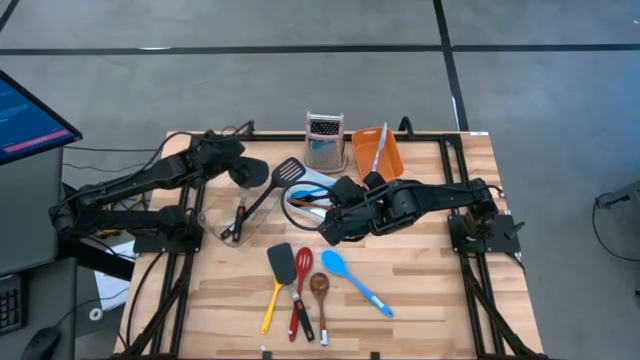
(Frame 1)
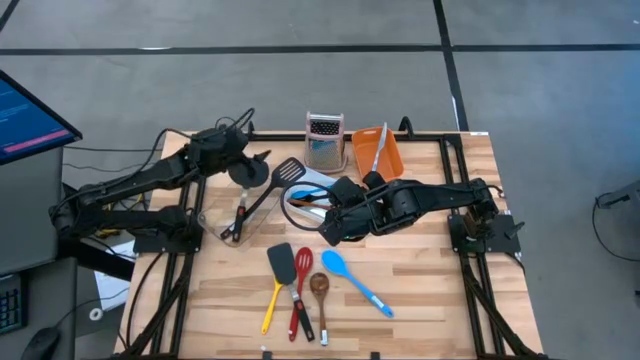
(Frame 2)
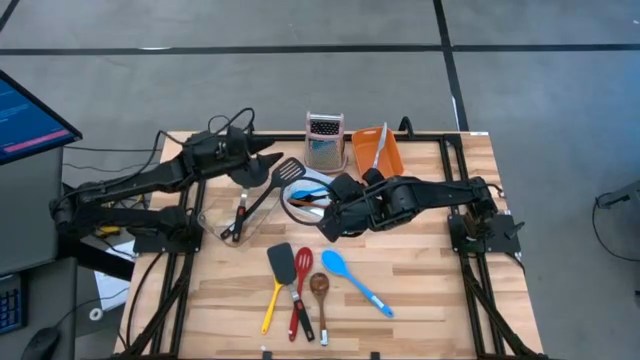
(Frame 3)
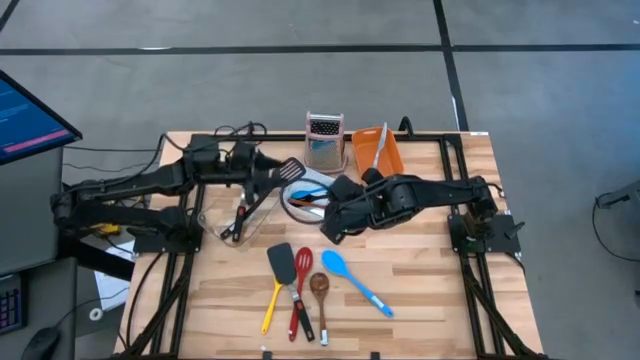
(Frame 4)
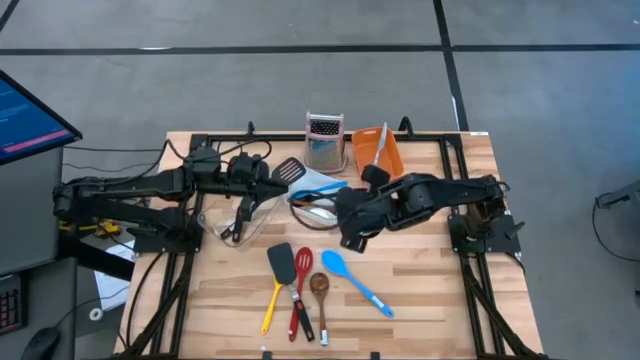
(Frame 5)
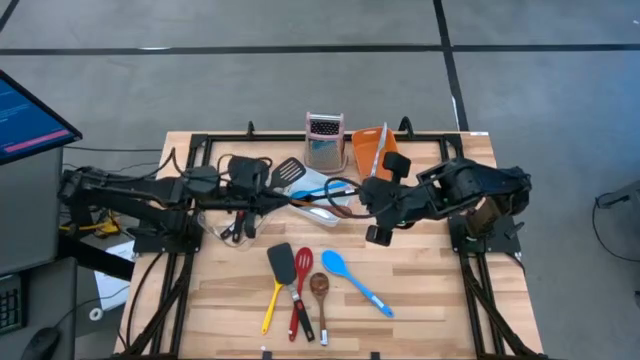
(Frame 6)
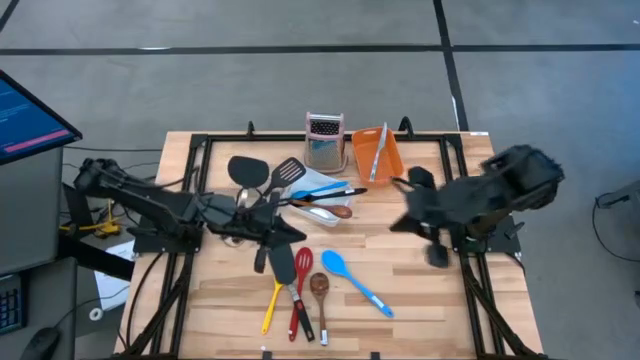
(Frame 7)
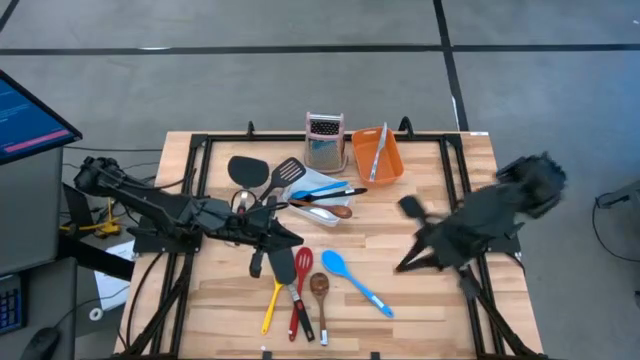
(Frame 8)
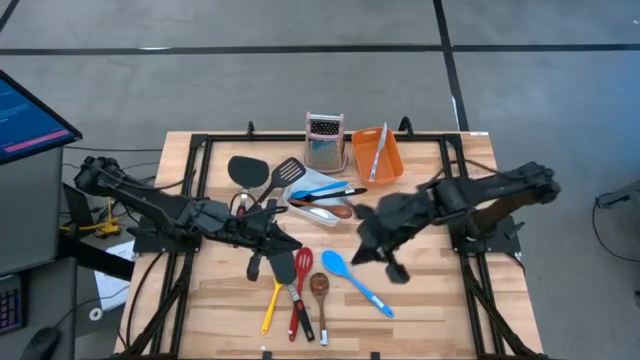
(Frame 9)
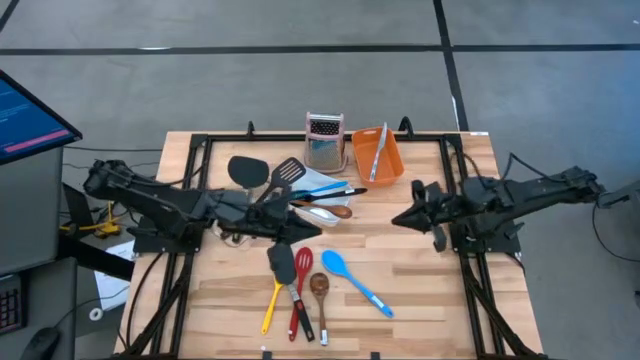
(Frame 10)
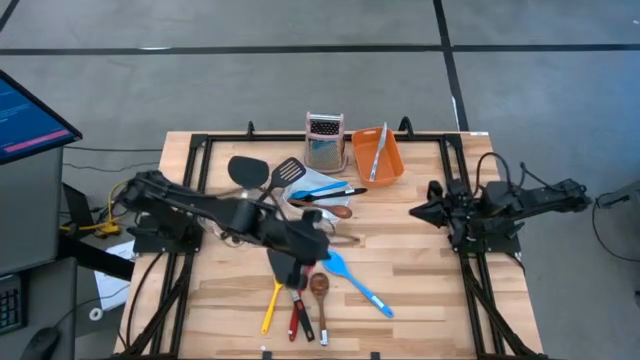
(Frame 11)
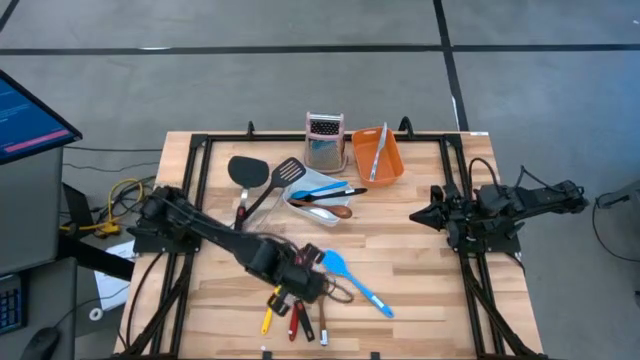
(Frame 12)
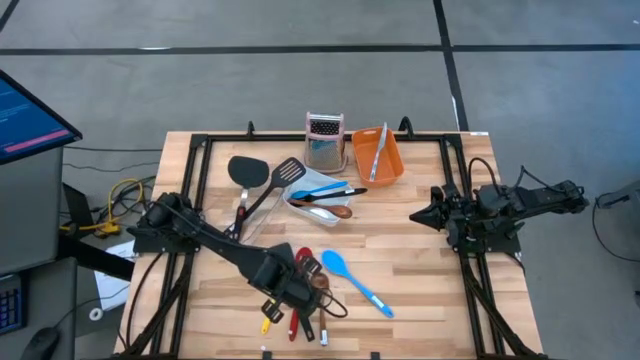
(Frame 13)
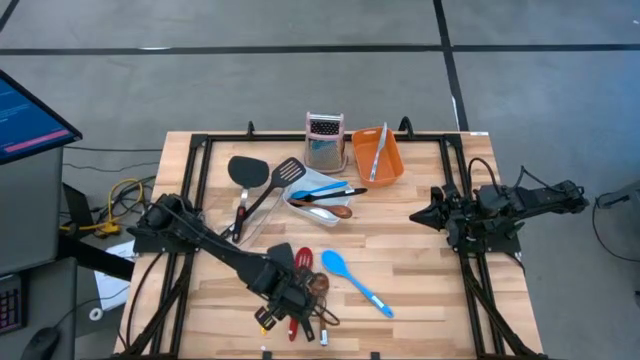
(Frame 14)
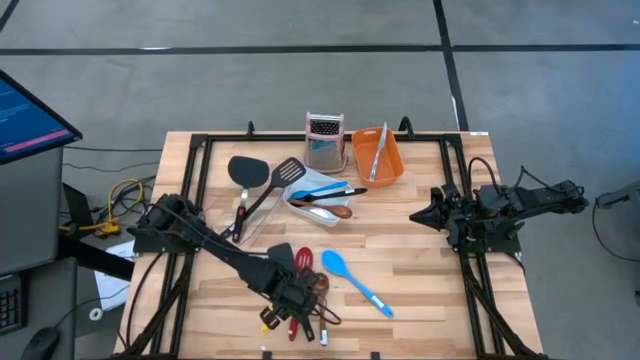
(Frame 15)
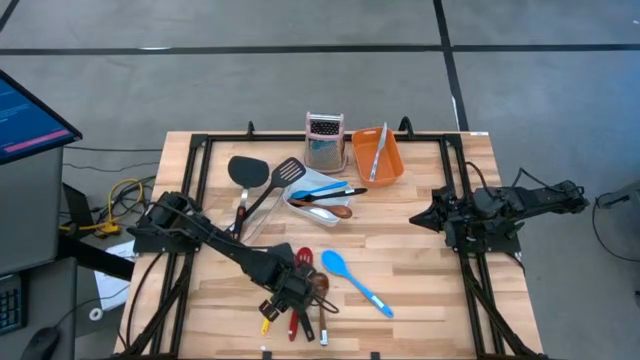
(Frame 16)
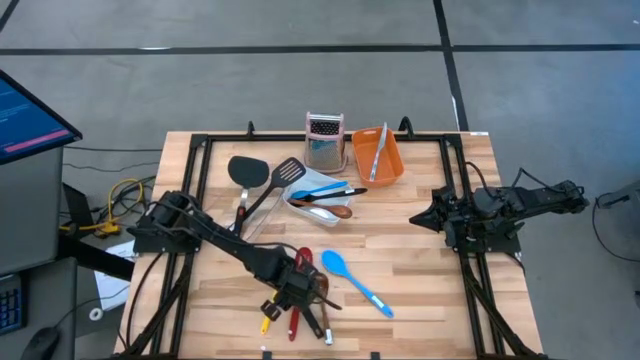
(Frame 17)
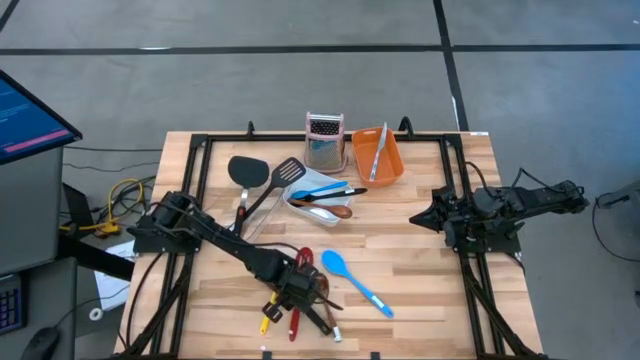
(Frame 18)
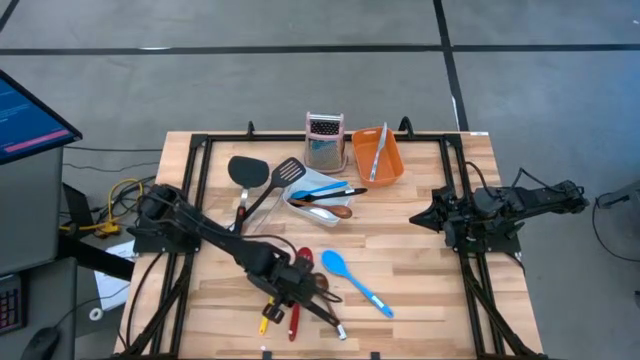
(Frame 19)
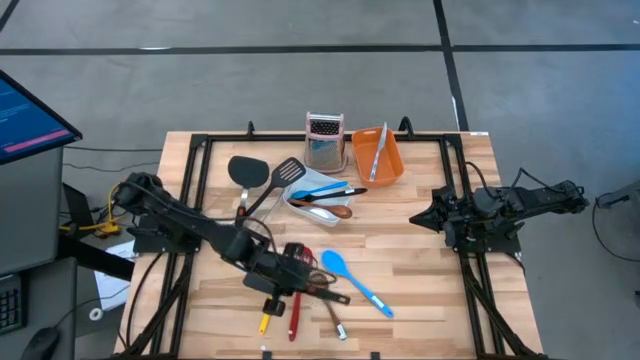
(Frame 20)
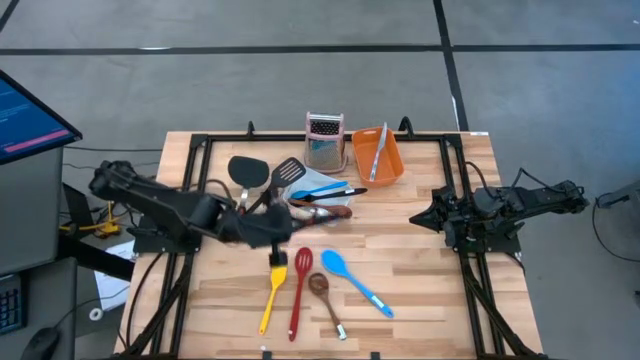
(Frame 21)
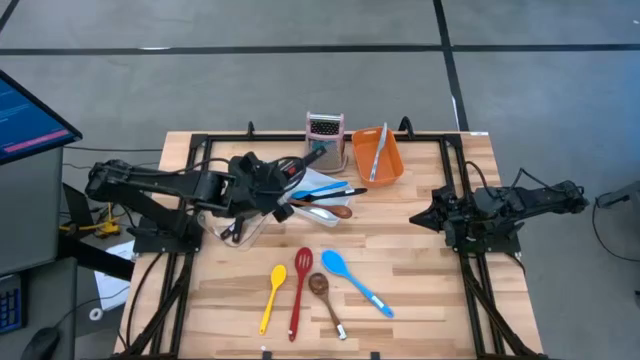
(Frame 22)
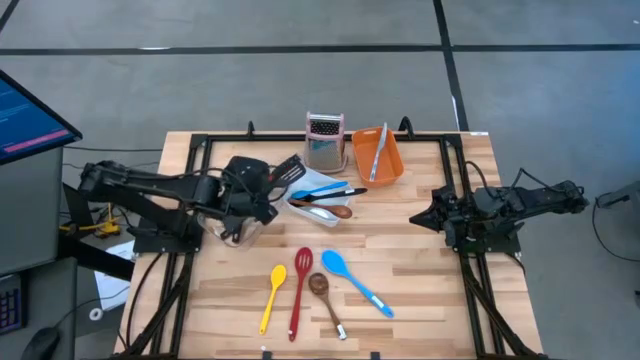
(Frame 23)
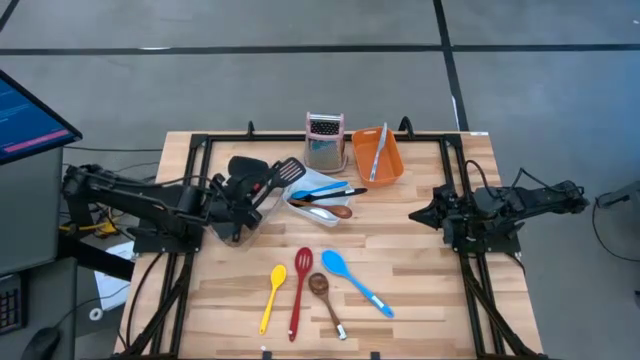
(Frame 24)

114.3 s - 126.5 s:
Task: Pick & Place Kitchen Items
Put the black turner spatula into the transparent bin

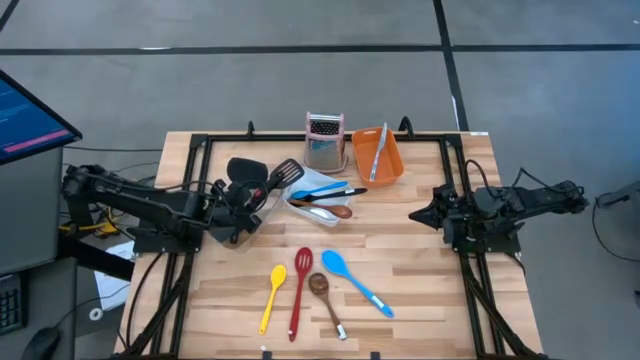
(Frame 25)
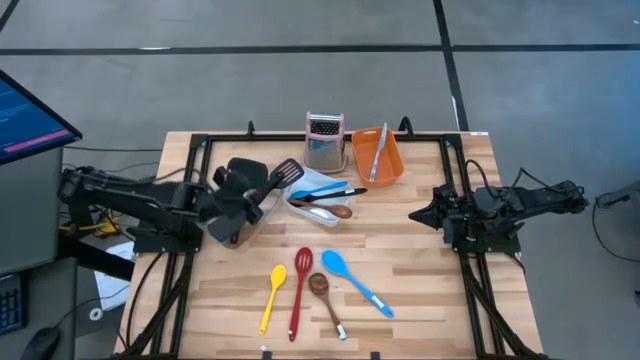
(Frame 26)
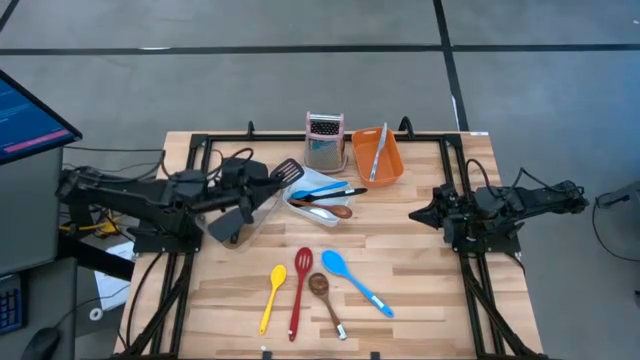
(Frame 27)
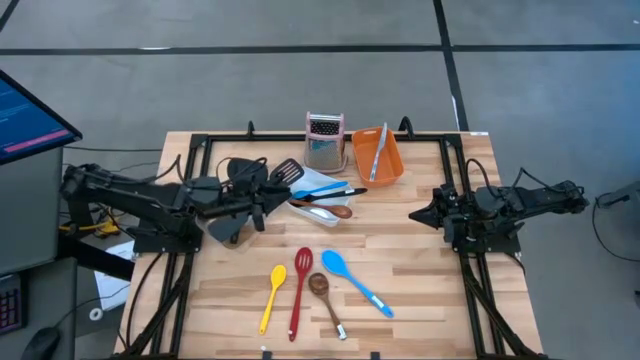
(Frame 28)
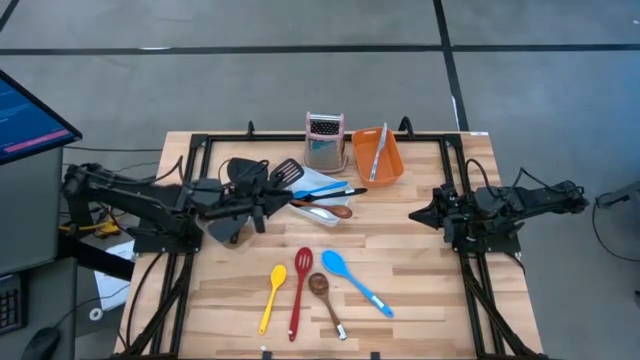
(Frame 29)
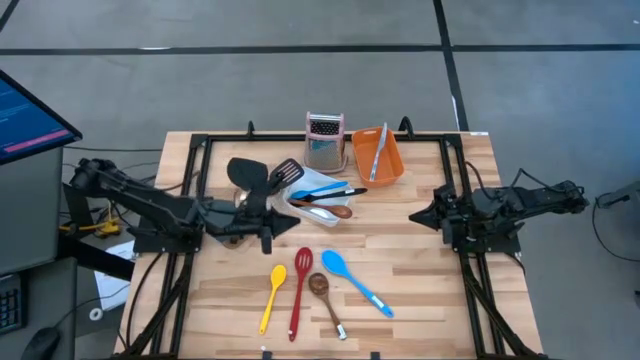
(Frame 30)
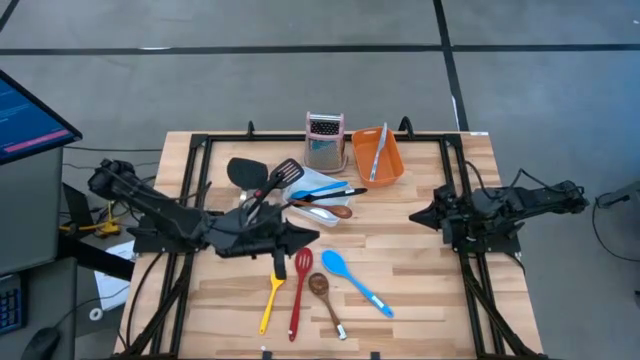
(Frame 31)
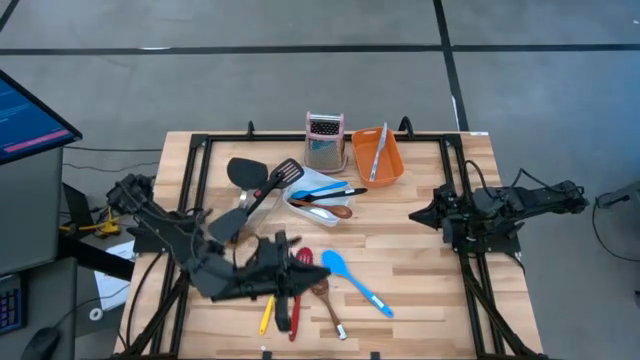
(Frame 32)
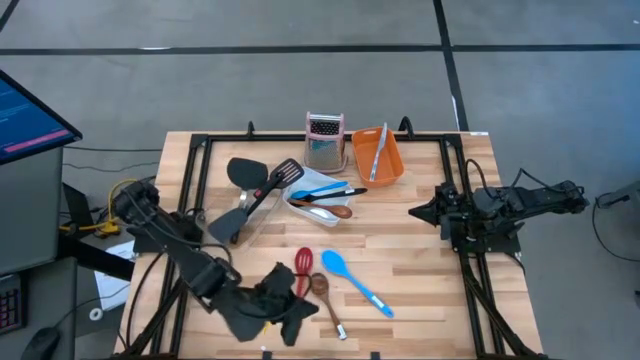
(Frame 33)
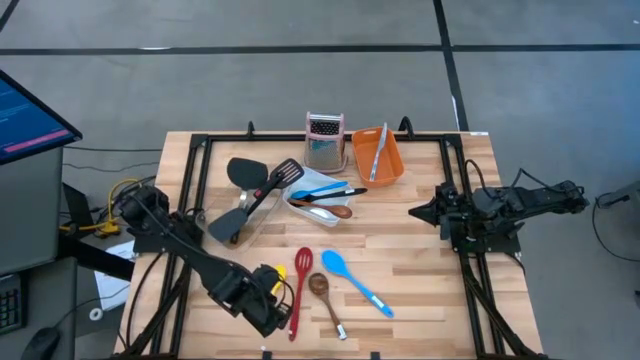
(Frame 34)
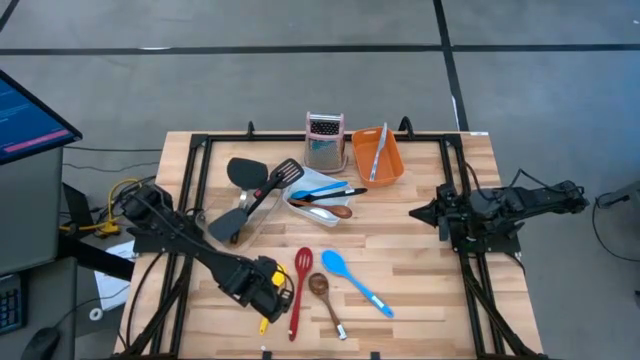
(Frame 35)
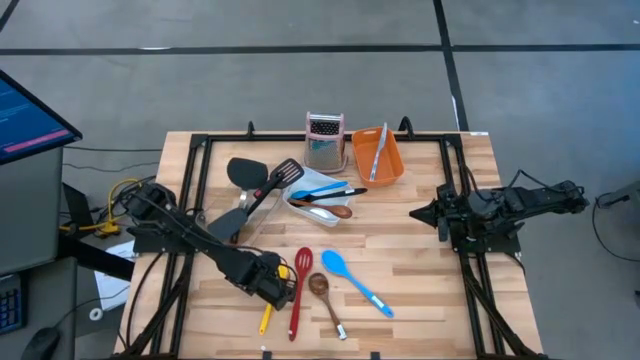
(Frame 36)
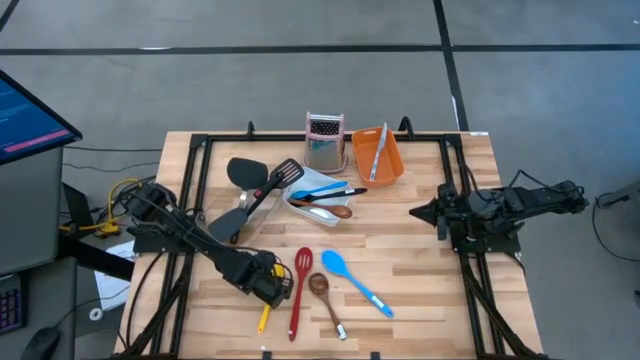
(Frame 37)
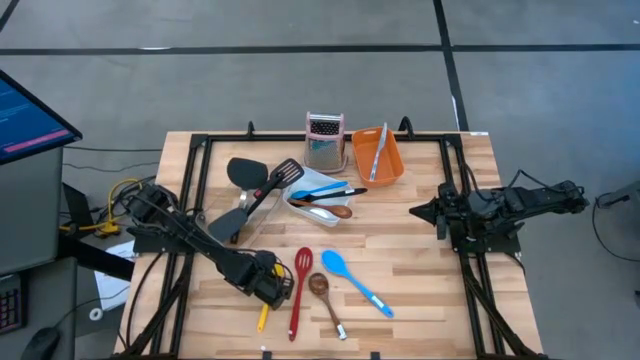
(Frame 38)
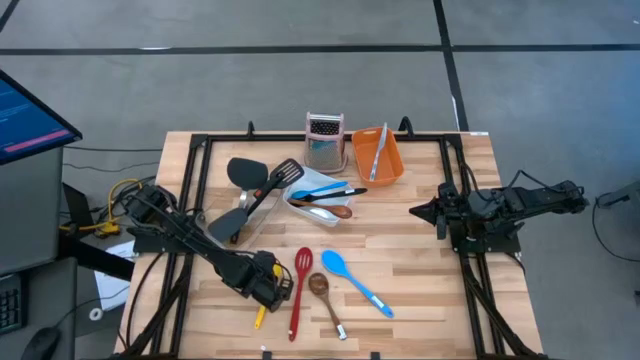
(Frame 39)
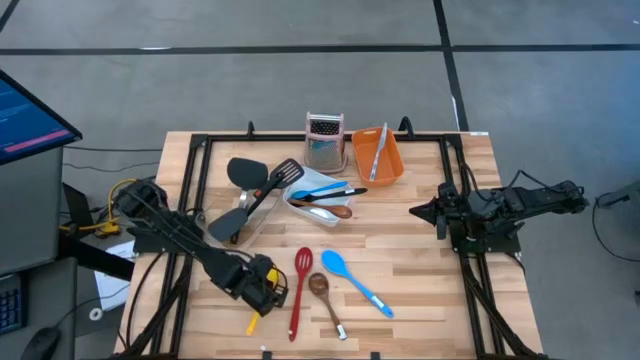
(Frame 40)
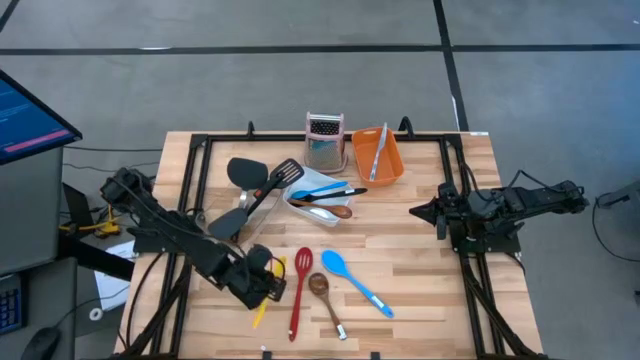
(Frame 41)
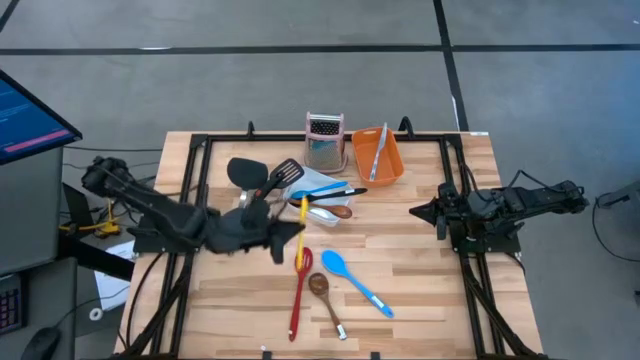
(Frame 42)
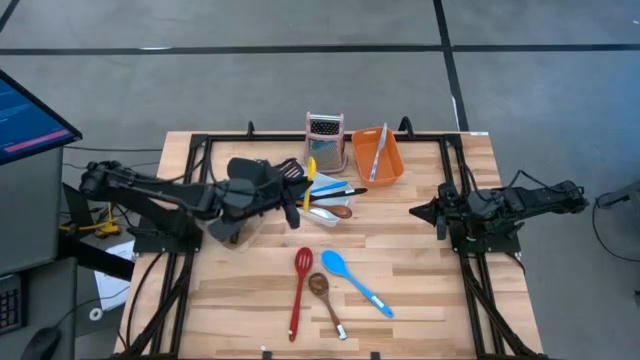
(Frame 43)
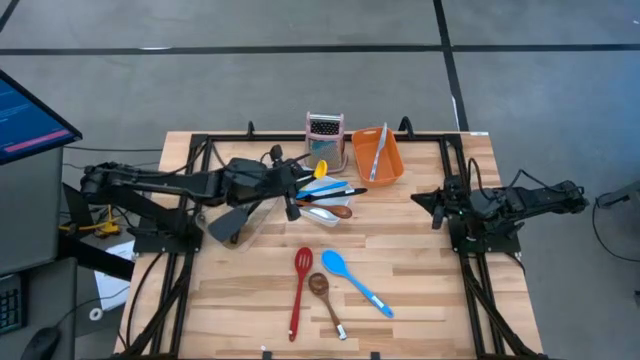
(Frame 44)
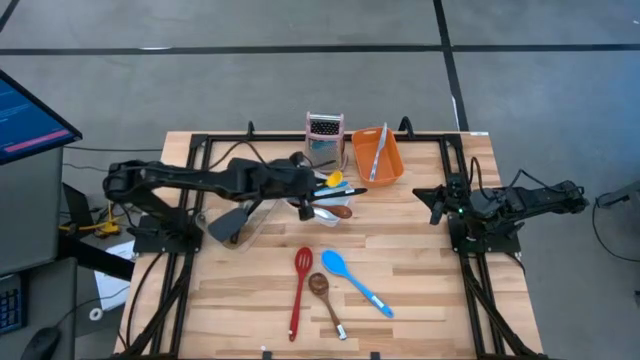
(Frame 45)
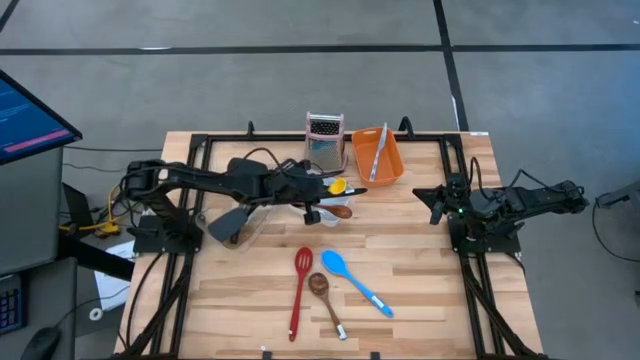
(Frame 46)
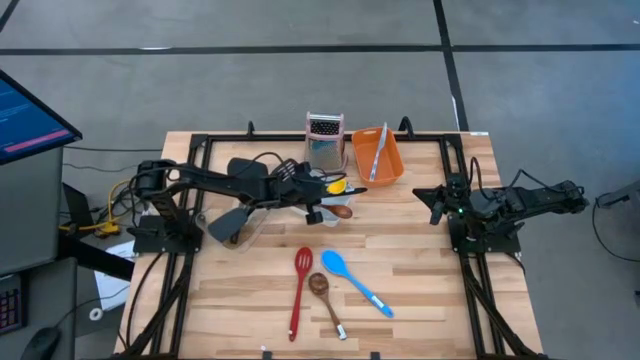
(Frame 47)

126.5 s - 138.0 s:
Put the yellow serving spoon into the white bin
